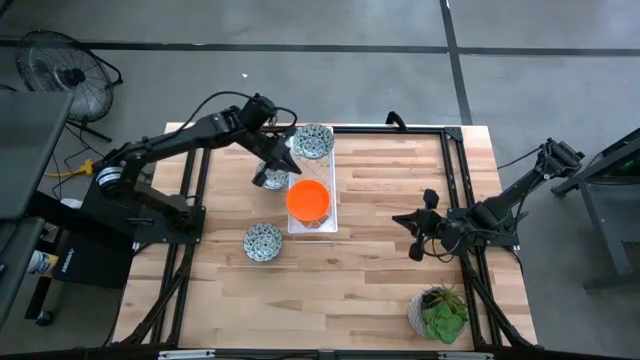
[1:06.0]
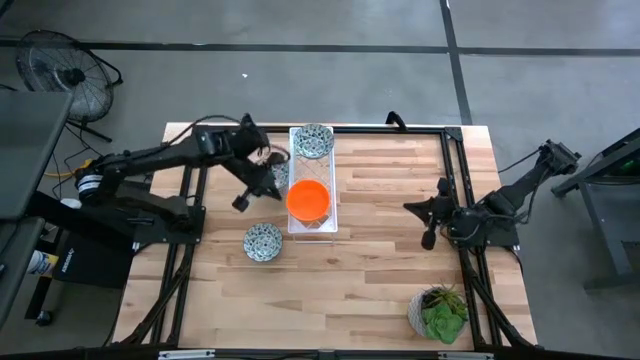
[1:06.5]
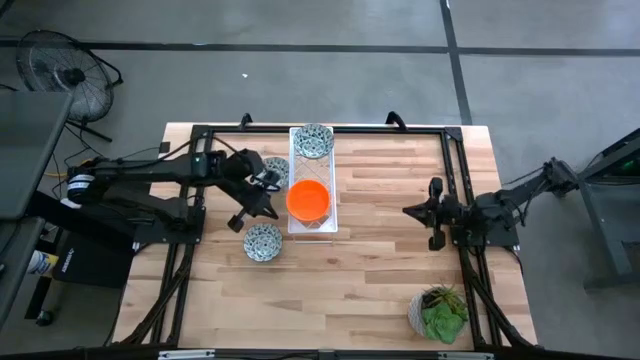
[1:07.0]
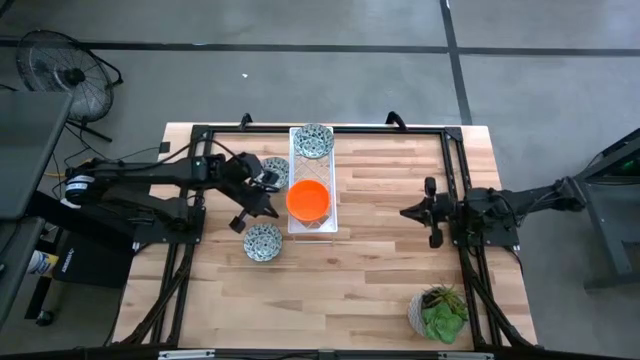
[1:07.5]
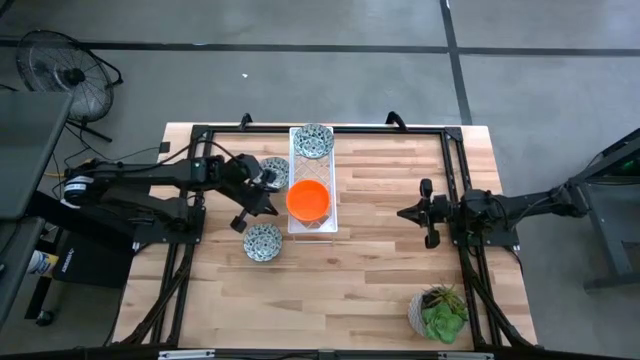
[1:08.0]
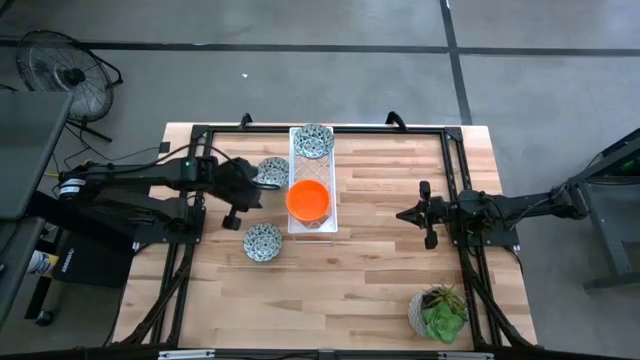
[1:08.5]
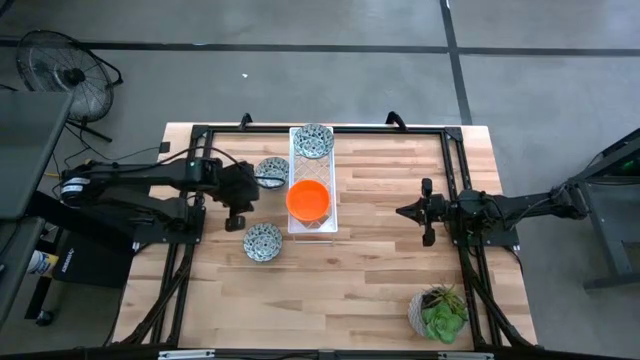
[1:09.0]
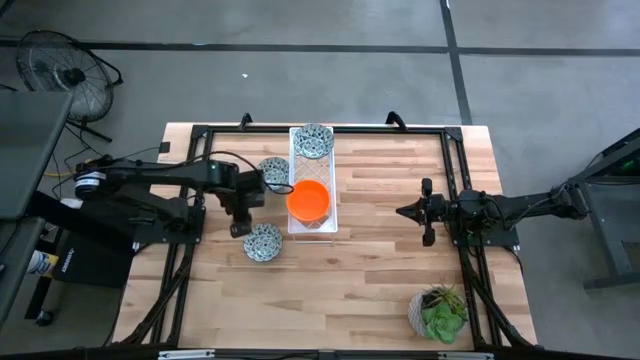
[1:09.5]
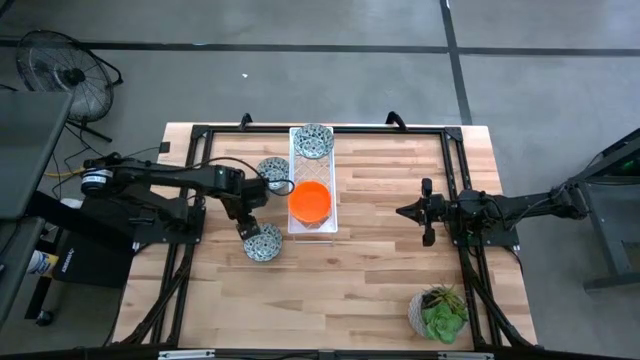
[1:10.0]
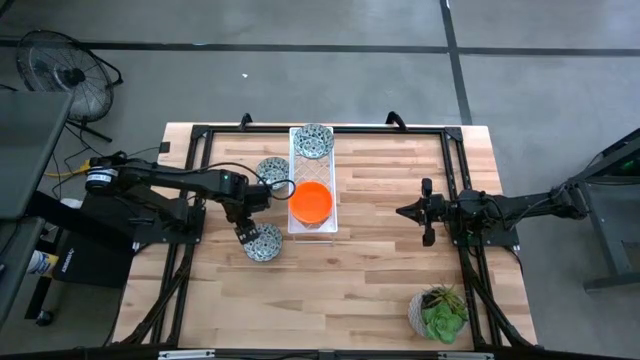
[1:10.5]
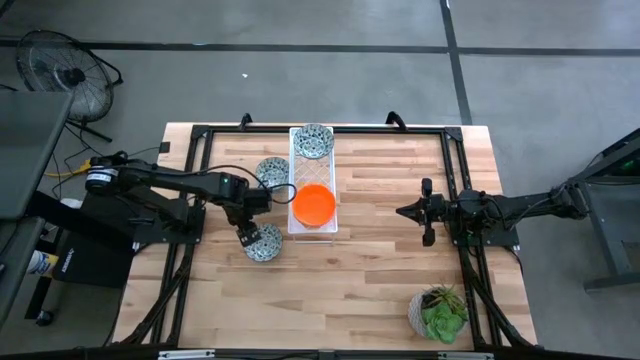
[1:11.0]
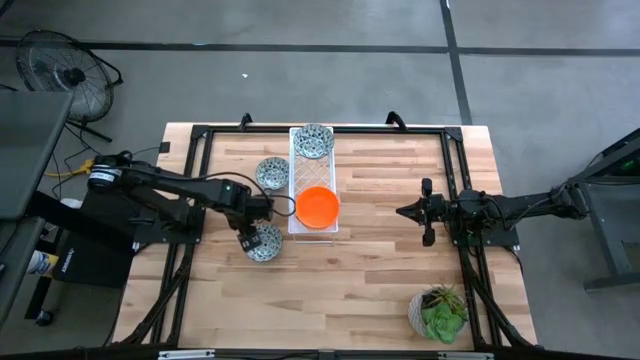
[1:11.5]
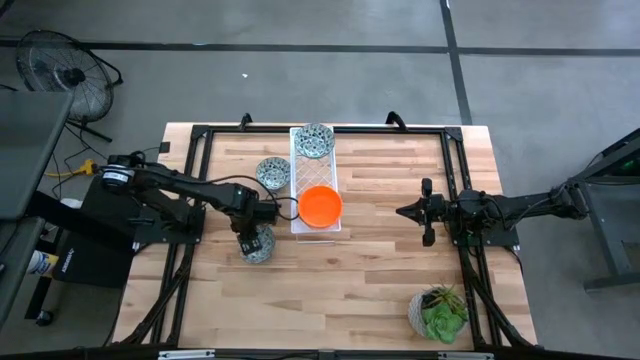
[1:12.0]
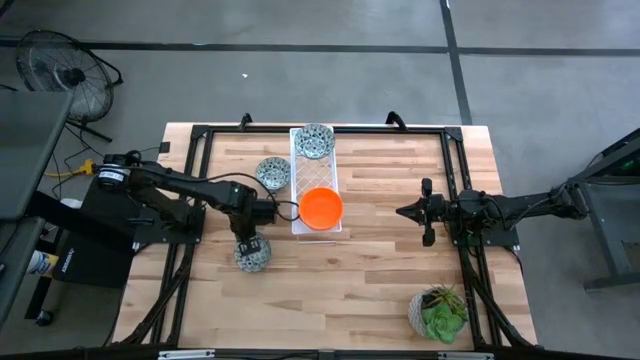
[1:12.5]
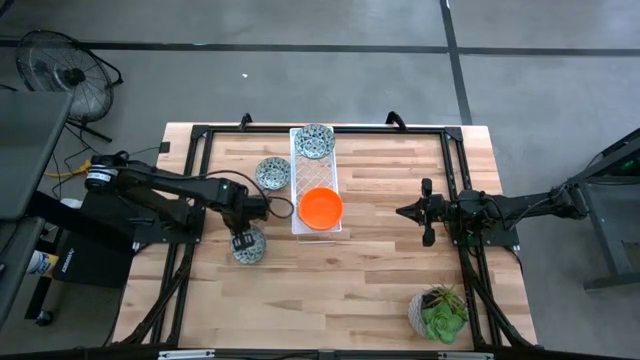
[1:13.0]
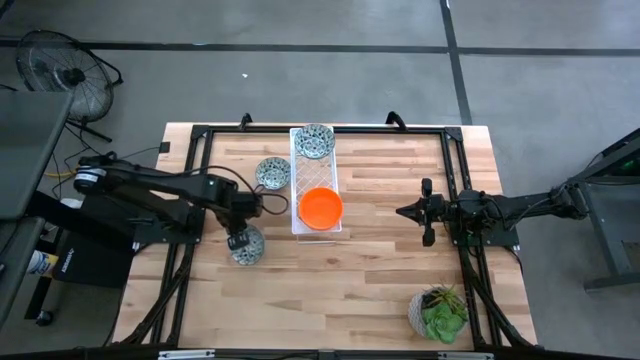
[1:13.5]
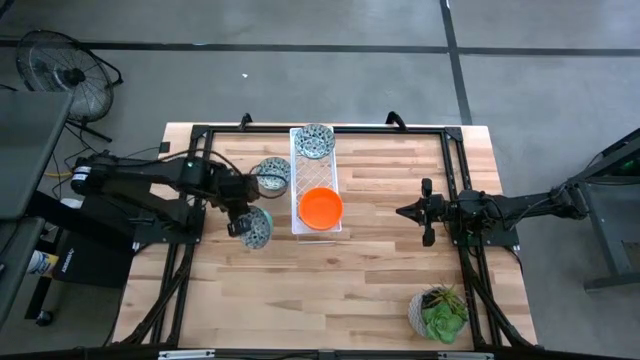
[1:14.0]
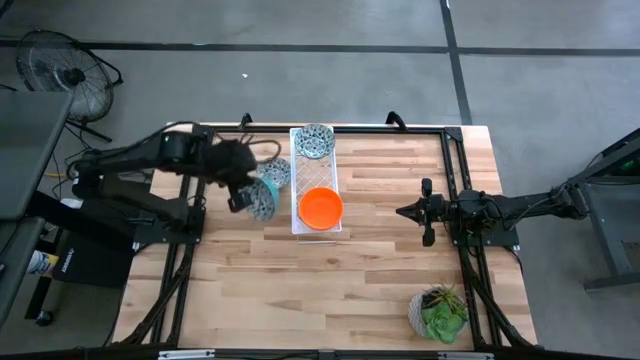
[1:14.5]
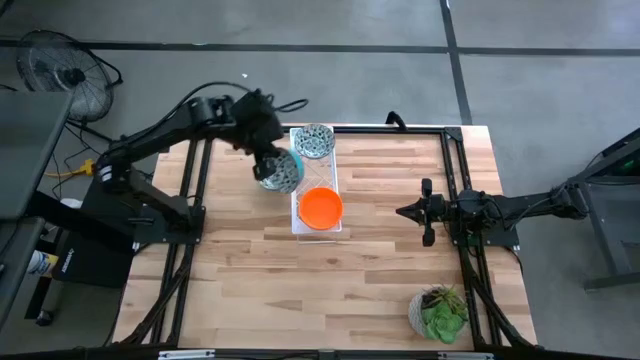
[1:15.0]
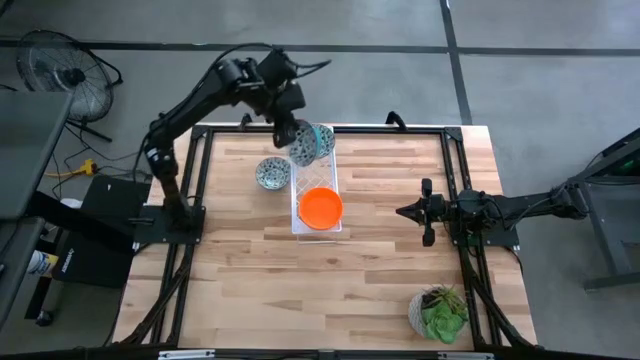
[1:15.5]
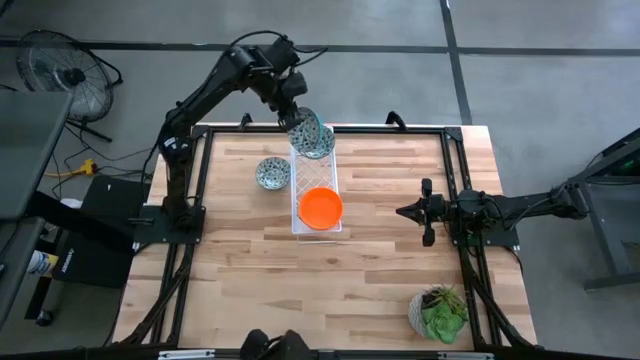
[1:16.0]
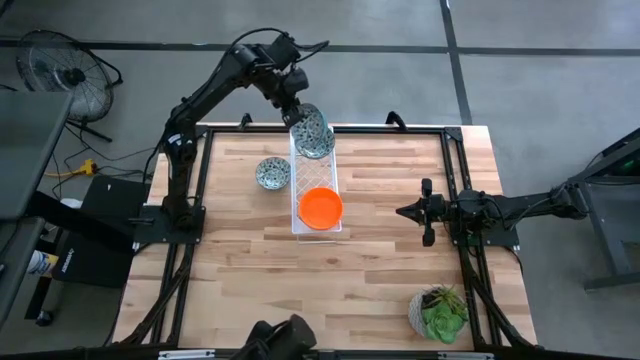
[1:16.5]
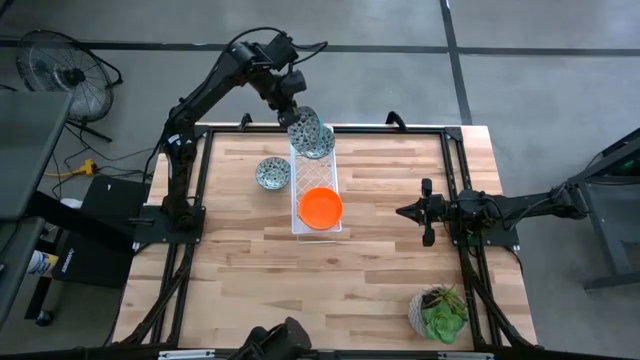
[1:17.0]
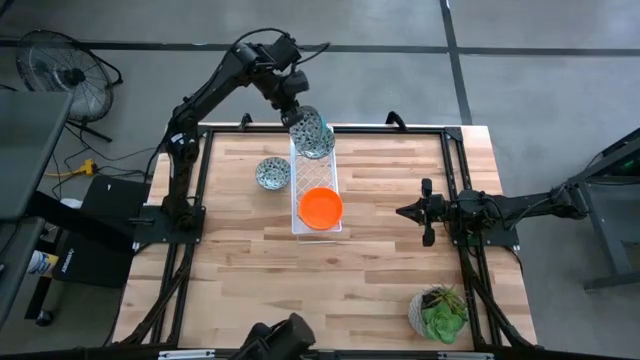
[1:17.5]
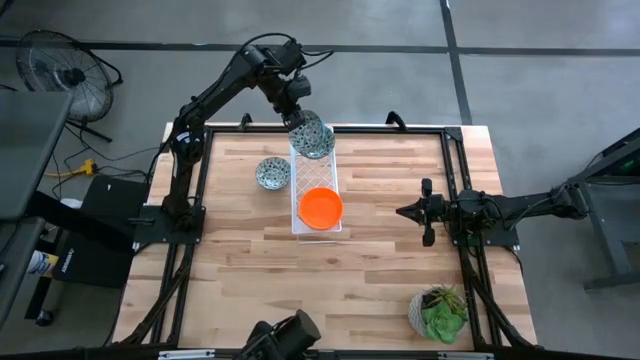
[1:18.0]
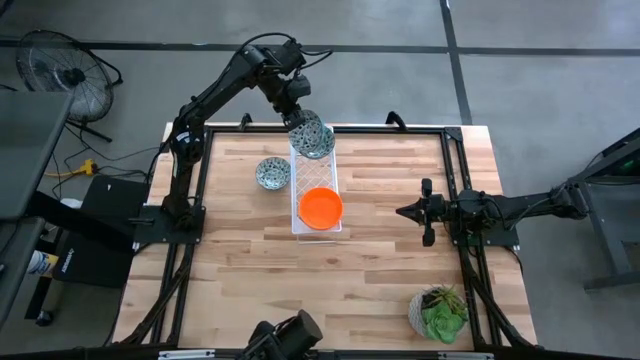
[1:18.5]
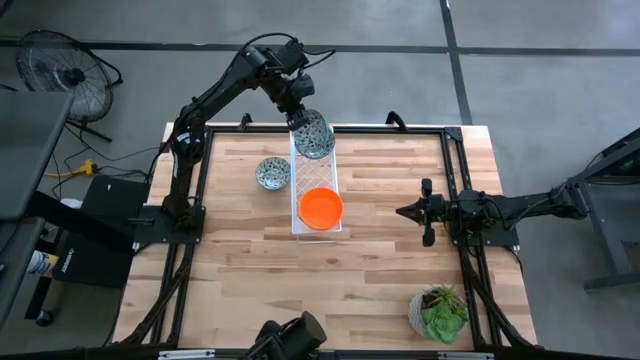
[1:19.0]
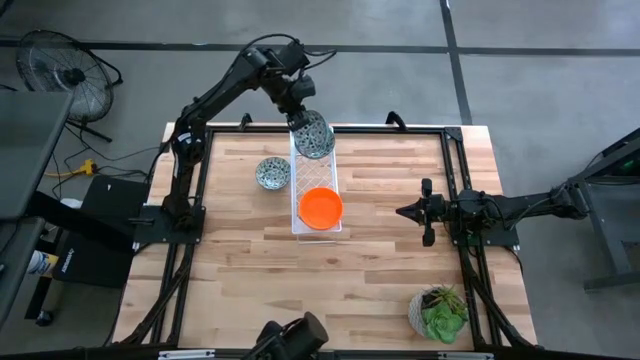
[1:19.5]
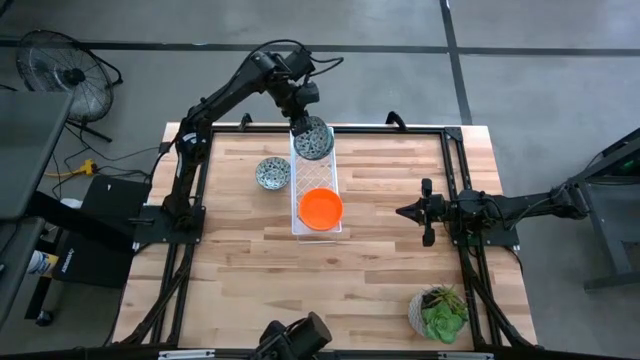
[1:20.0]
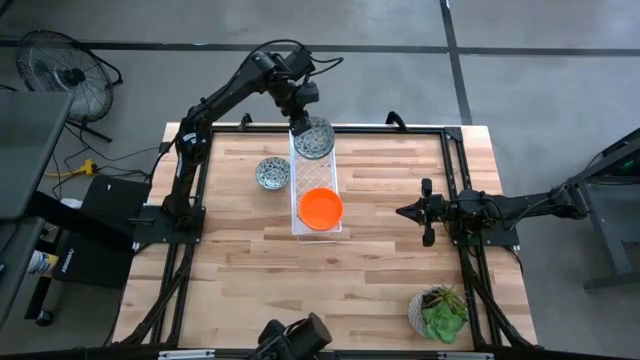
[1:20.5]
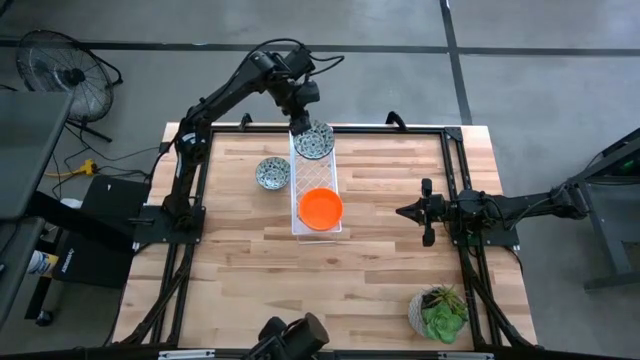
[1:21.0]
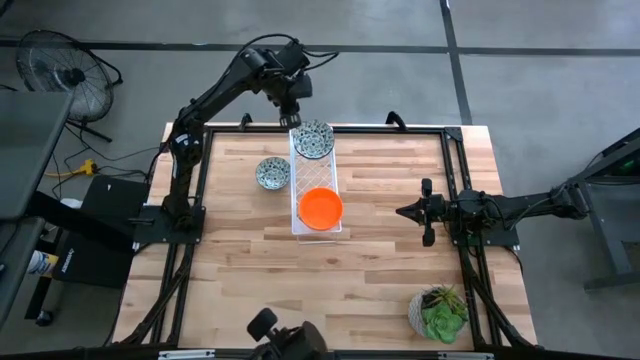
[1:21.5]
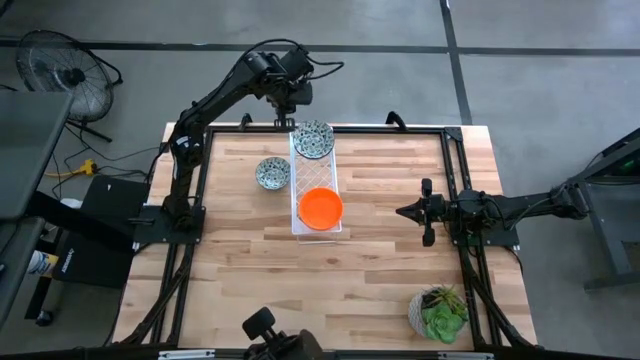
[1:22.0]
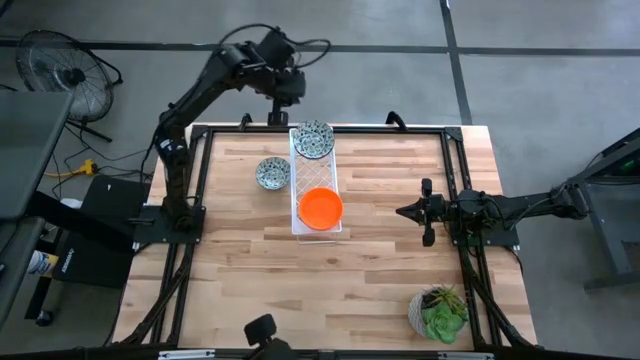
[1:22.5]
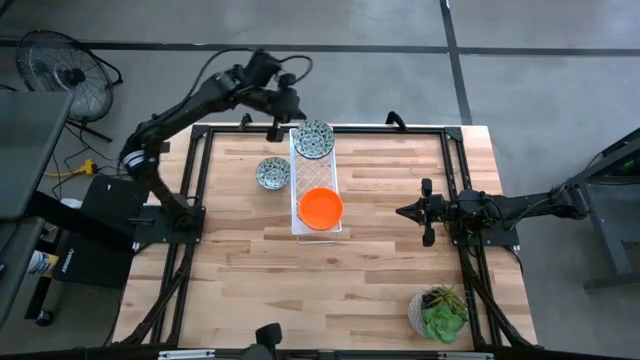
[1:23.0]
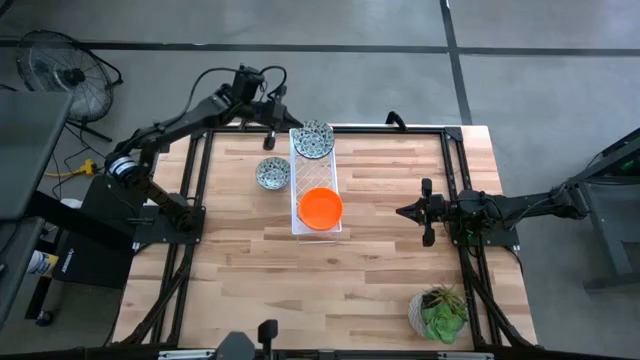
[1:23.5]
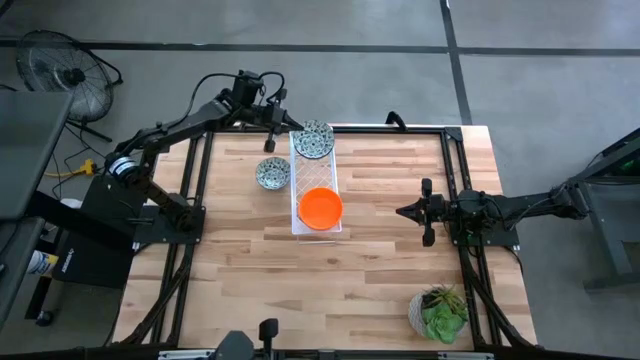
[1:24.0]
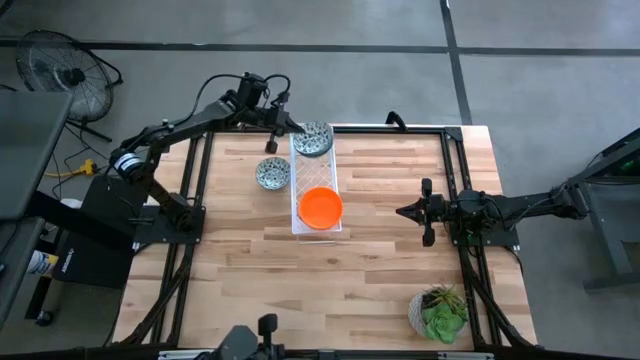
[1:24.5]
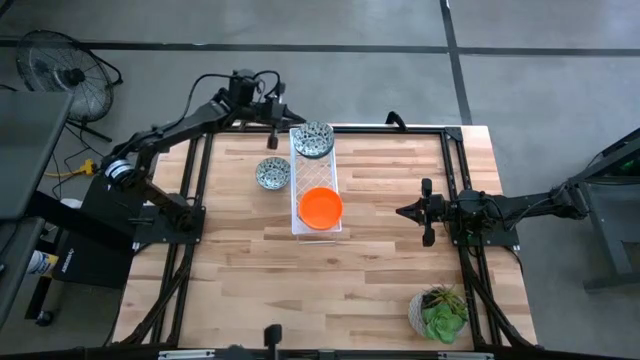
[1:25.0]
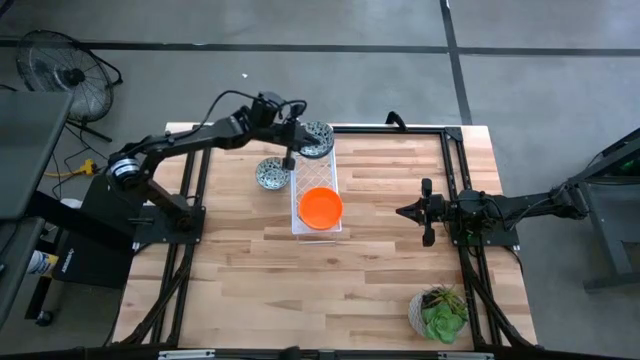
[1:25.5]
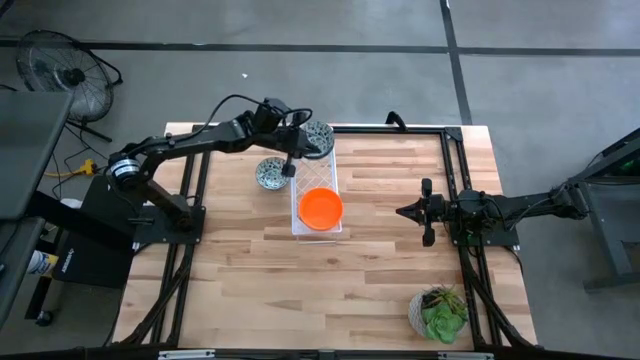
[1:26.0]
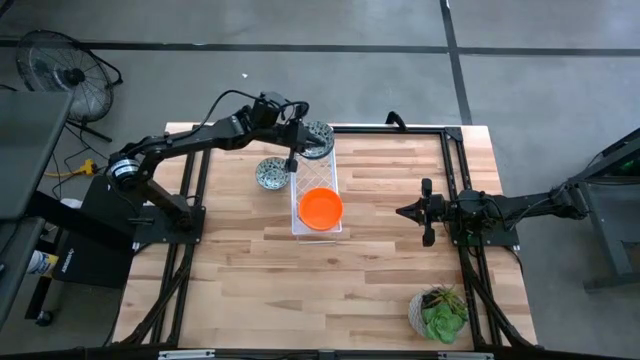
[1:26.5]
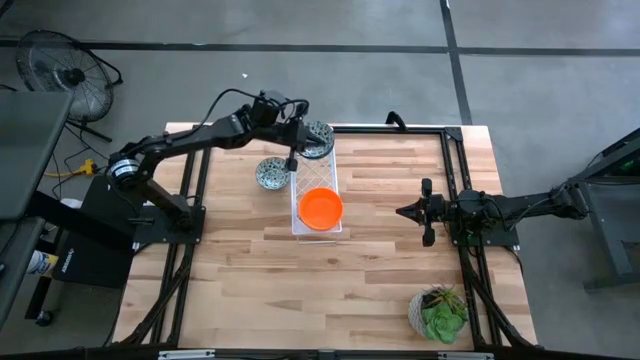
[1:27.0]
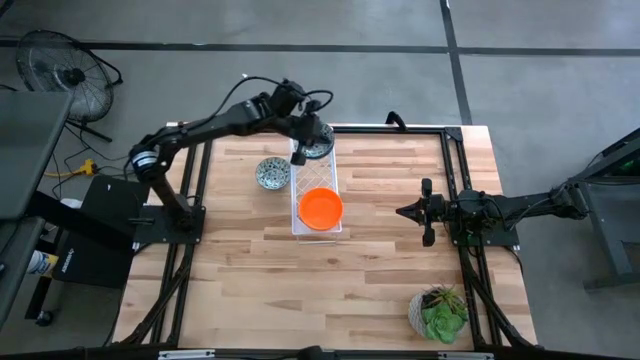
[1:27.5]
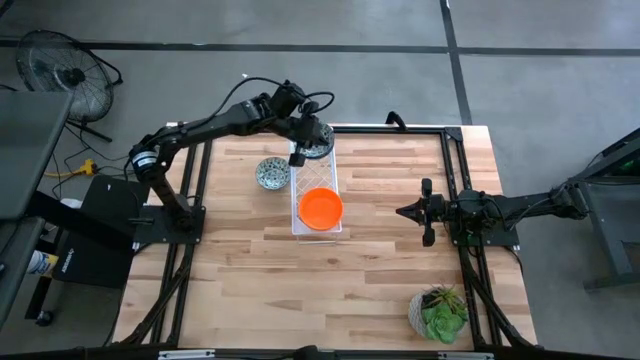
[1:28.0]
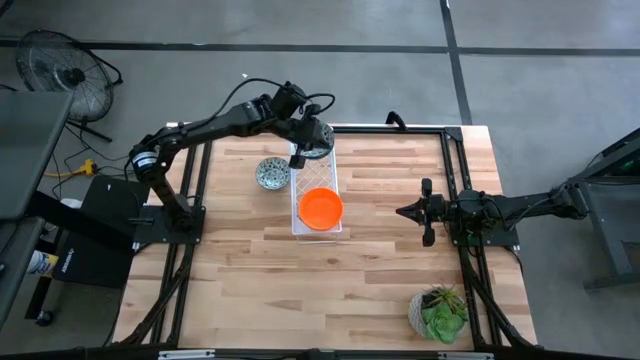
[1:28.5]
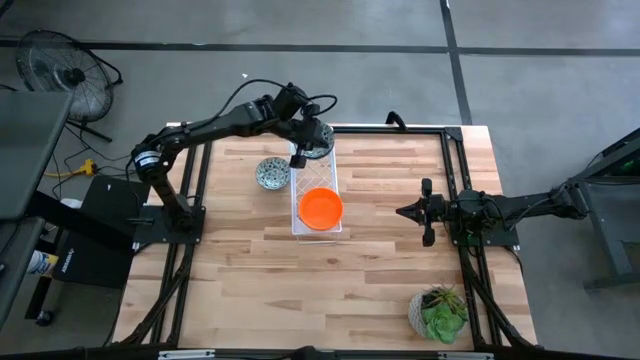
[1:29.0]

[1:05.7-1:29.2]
Task: Pick & Place Mini bowls
Stack the bottom white bowl on the white bowl on the shelf
